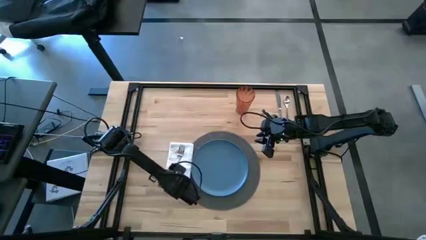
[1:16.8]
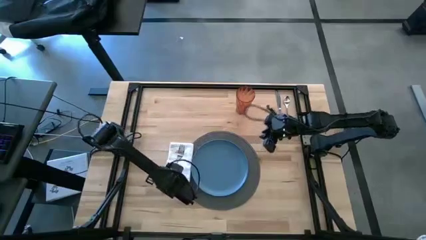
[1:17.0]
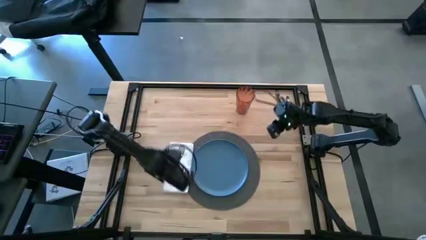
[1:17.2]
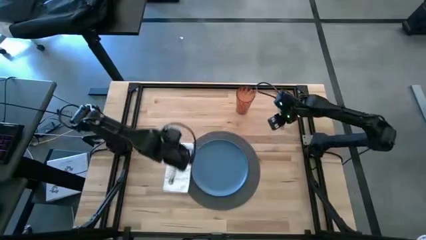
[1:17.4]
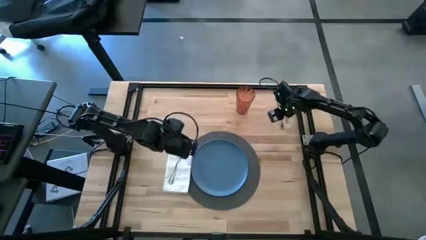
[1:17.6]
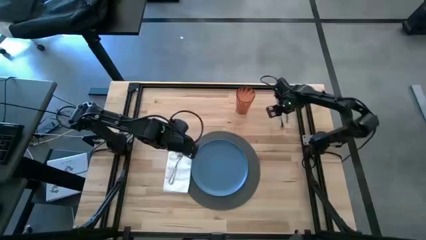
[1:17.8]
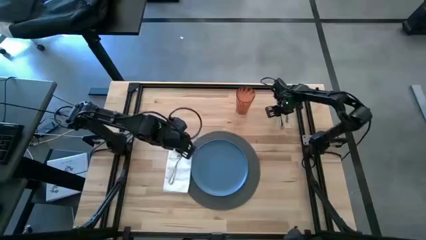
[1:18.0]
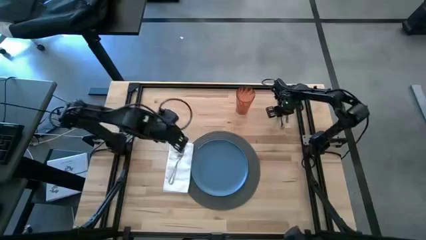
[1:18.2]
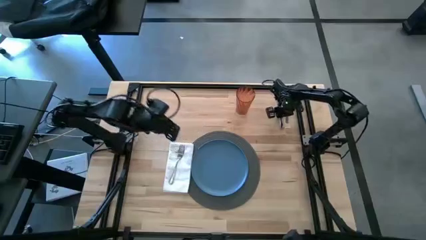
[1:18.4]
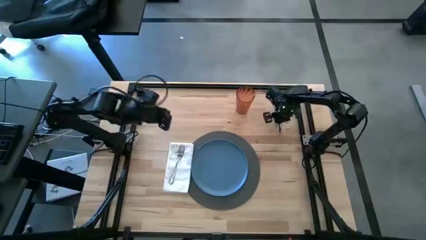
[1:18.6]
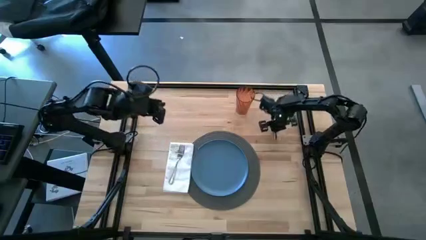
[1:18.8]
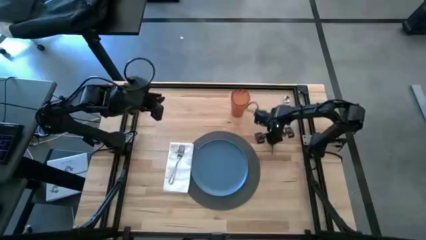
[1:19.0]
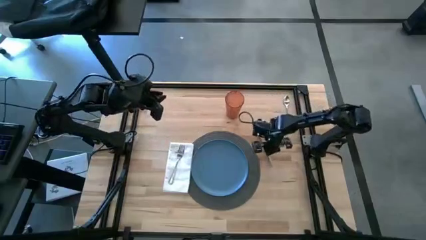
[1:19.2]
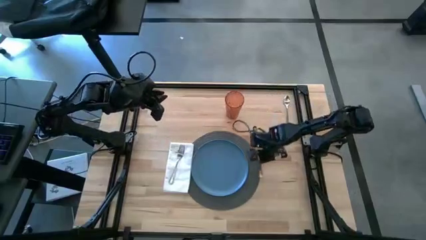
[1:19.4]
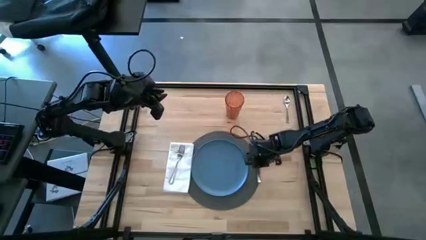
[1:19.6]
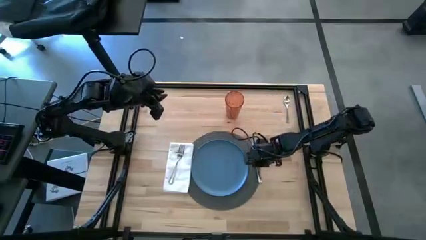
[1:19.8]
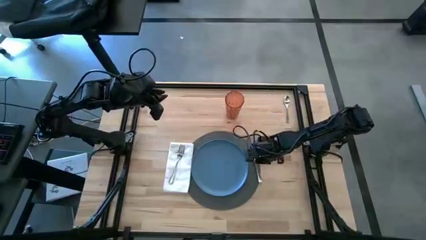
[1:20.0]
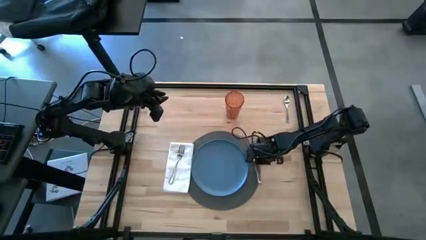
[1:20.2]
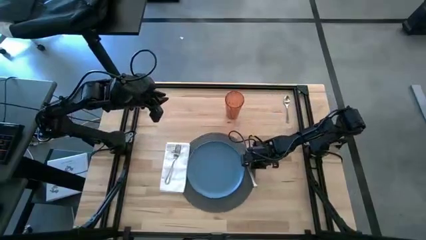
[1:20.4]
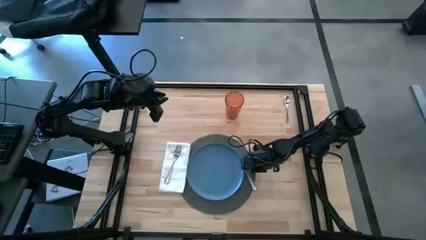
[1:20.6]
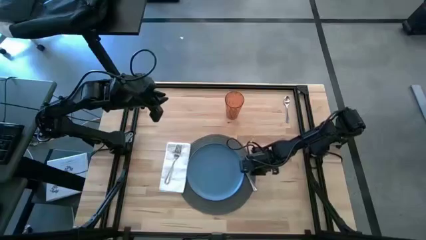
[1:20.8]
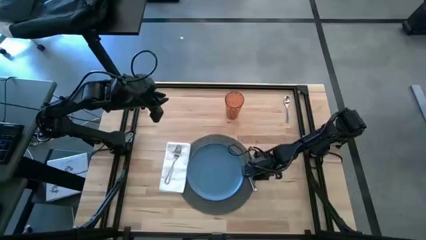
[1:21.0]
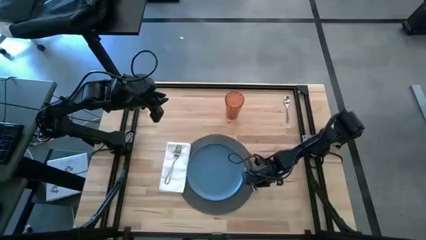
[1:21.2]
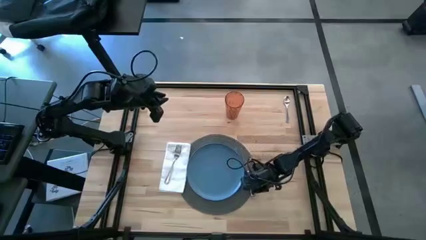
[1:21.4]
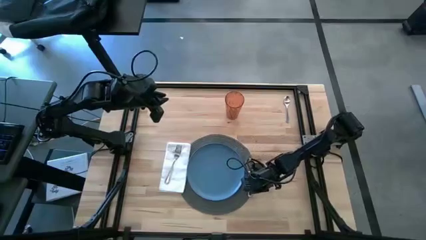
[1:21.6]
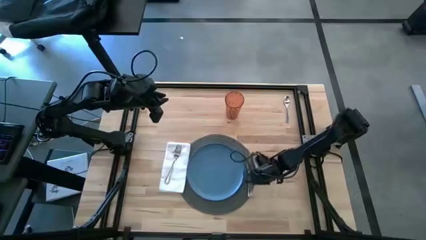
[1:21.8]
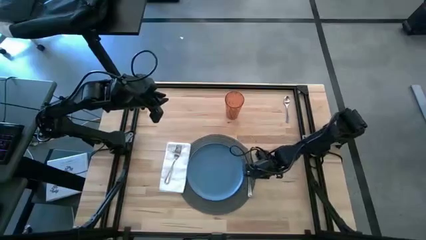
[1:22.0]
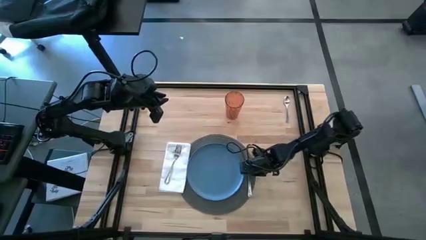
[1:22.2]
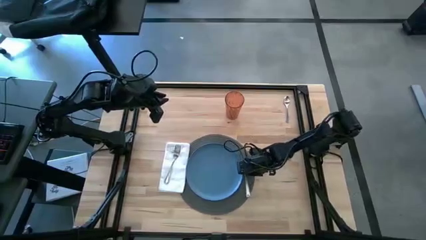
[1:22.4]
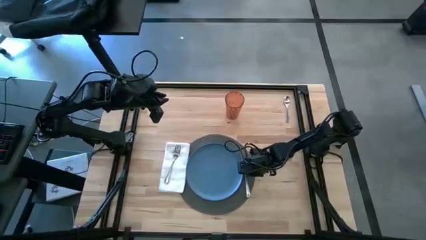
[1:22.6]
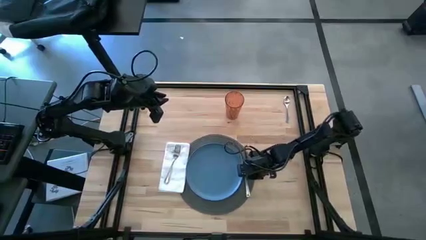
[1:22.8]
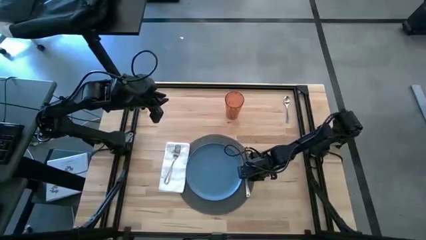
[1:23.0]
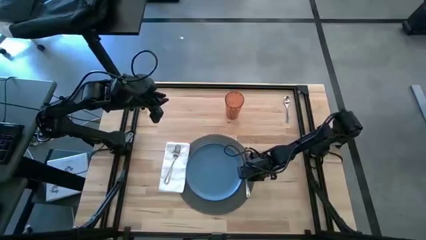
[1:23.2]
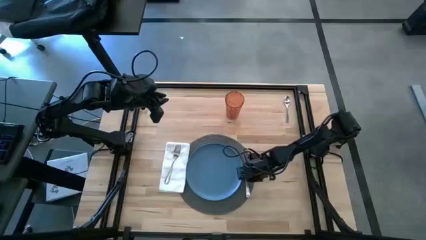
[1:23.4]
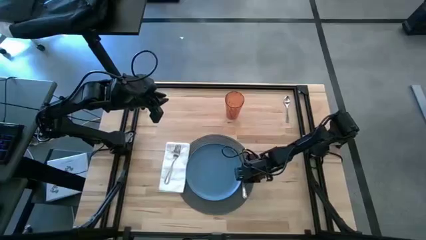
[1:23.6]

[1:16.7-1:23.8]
Task: Set table place
Put the silver knife on the gray mat

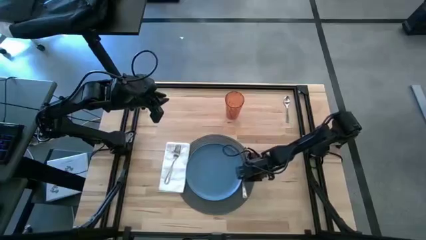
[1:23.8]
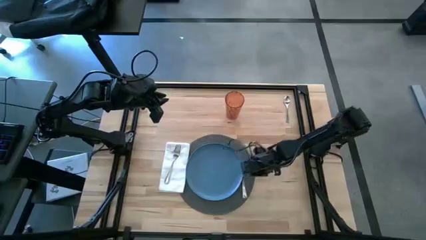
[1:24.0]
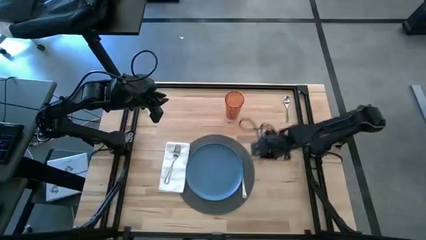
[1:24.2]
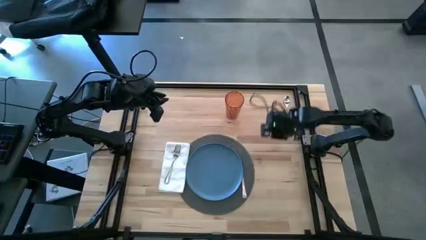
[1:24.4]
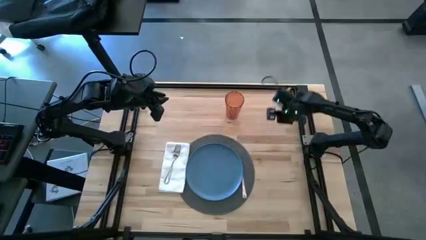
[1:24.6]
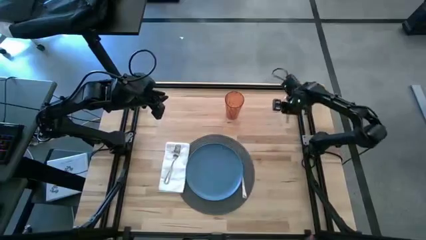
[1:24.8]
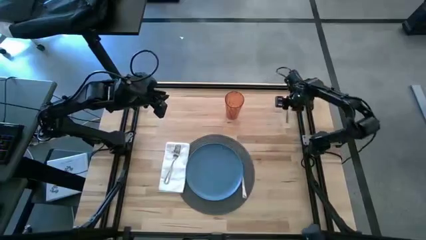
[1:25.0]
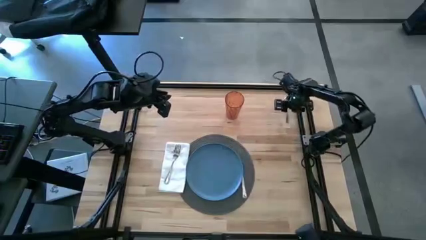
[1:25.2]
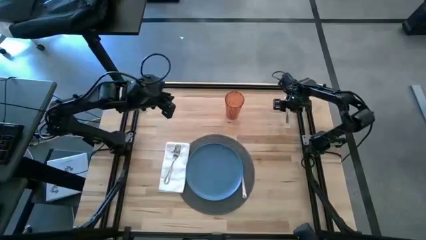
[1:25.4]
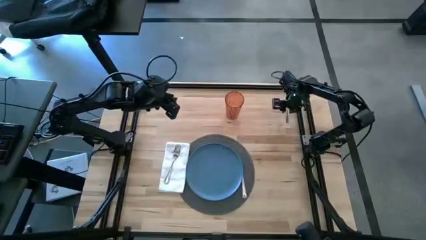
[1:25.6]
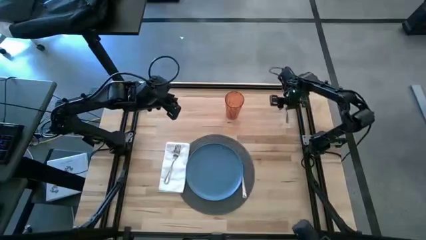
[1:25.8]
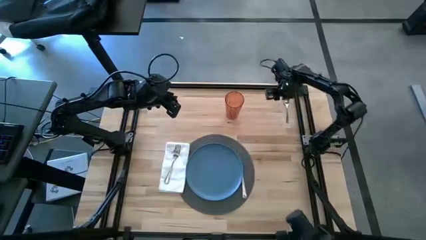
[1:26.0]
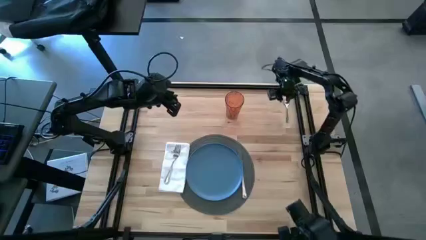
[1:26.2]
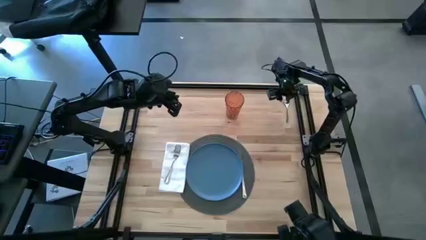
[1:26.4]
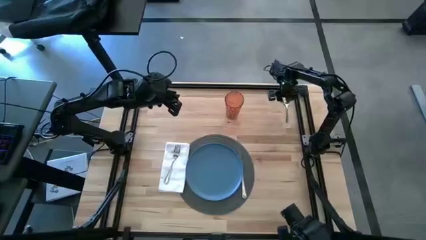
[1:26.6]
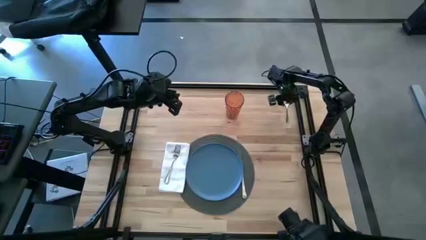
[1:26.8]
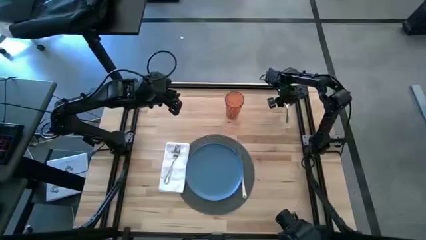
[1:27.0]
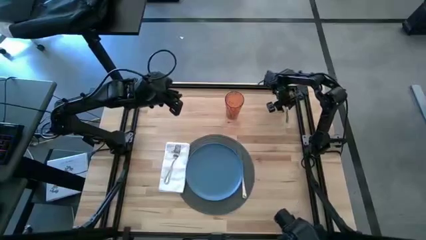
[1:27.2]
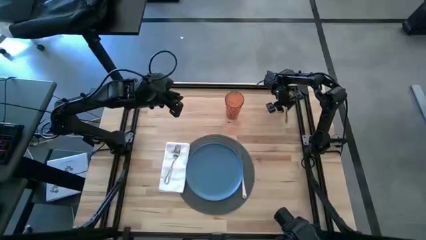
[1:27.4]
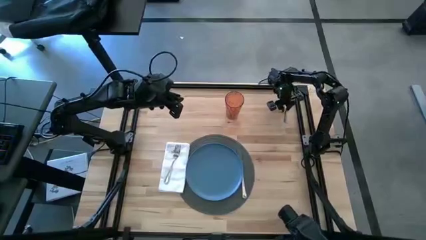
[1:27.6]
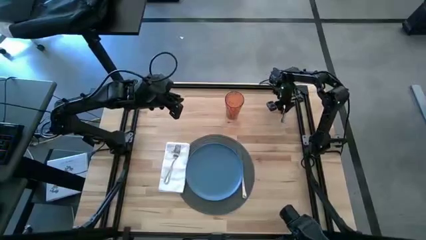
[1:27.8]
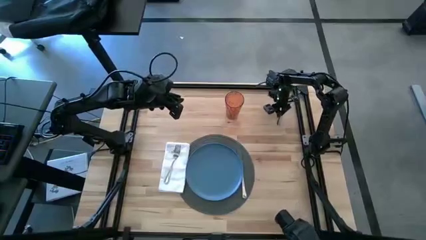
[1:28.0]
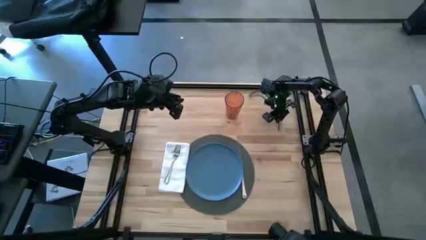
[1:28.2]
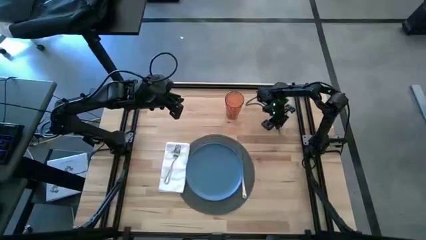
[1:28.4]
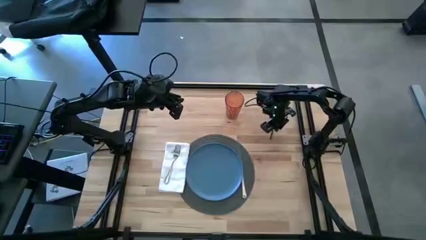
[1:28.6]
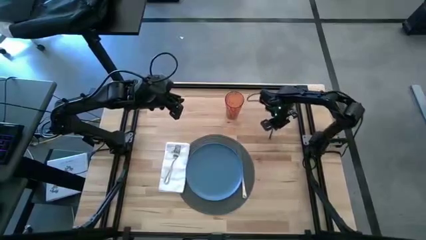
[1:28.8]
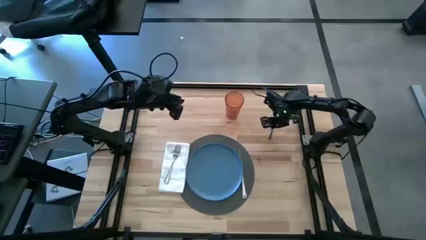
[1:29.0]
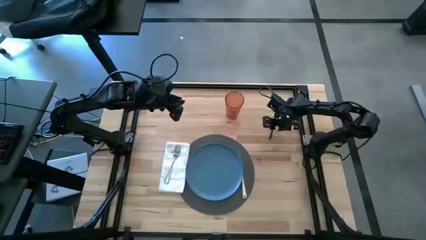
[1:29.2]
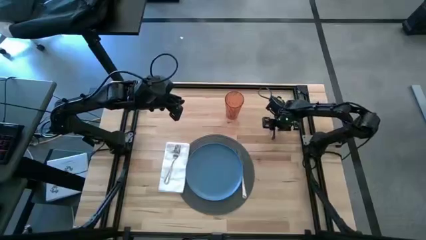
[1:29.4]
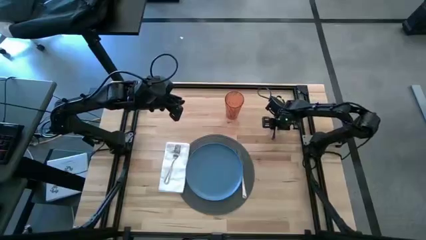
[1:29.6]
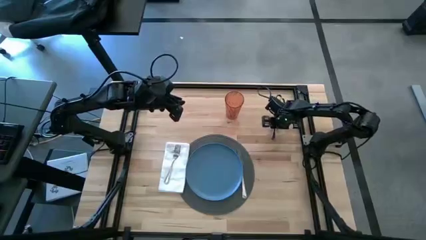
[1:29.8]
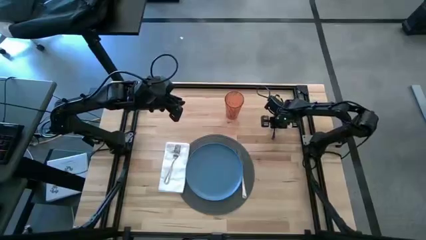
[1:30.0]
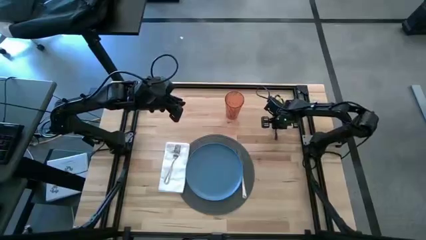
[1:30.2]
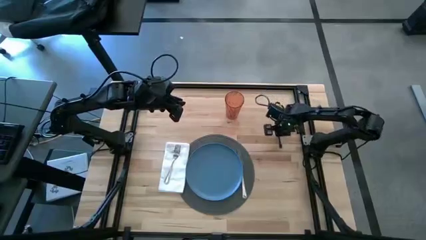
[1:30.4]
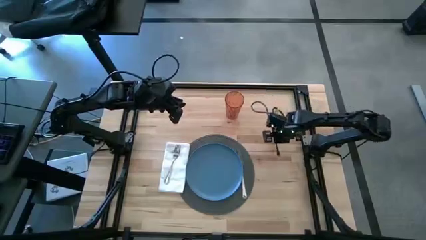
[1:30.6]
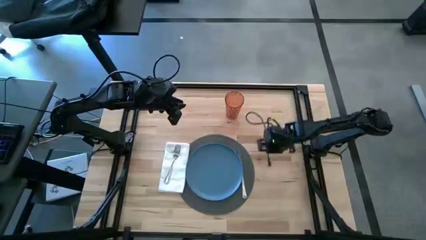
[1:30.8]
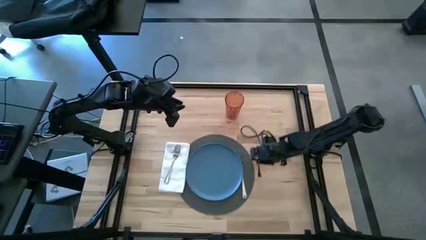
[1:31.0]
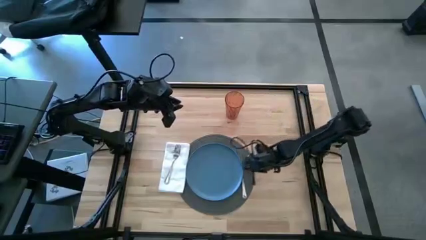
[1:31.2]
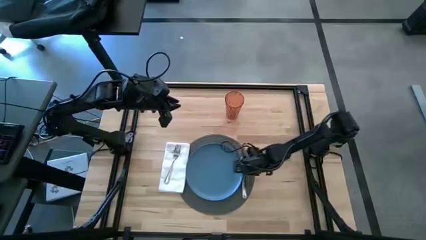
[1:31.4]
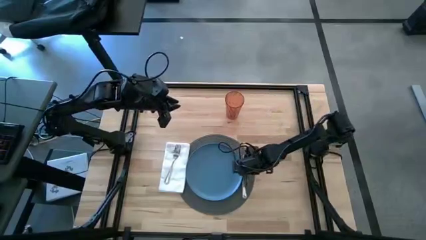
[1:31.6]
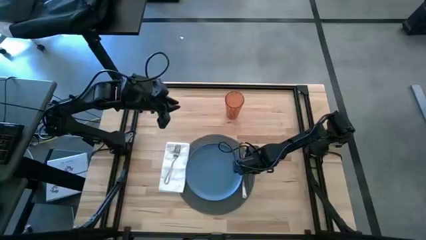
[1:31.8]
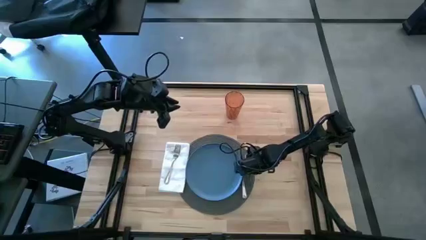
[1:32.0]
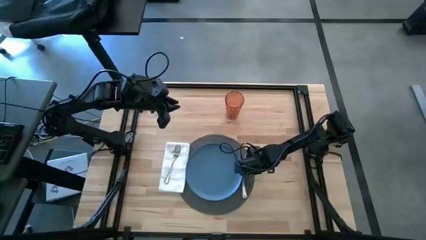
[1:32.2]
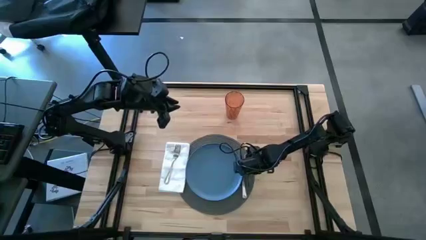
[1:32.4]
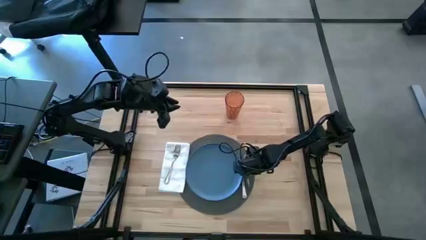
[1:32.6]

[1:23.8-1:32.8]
Put the silver spoon on the gray mat

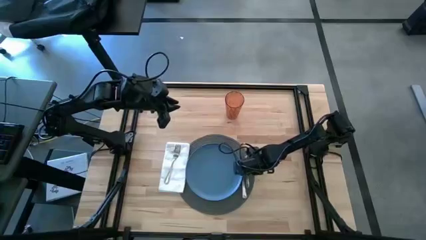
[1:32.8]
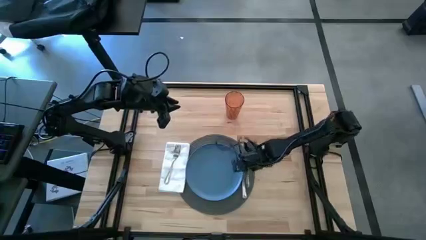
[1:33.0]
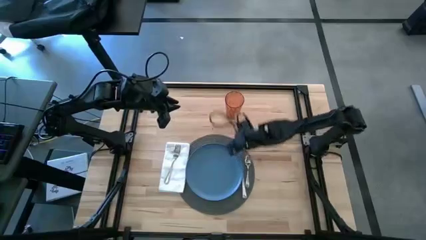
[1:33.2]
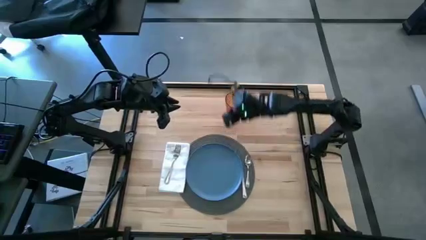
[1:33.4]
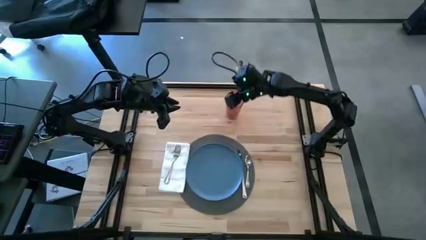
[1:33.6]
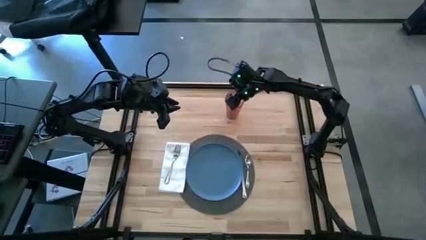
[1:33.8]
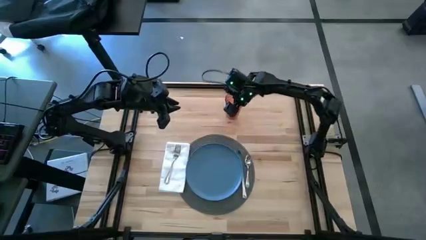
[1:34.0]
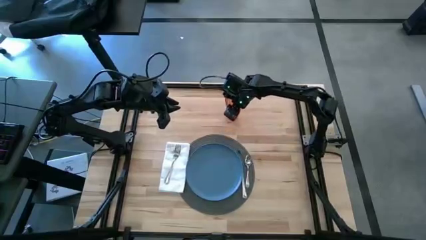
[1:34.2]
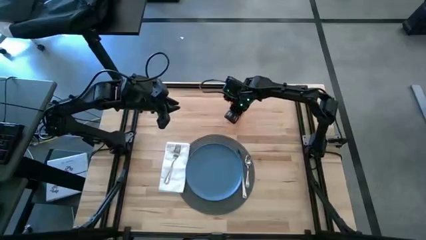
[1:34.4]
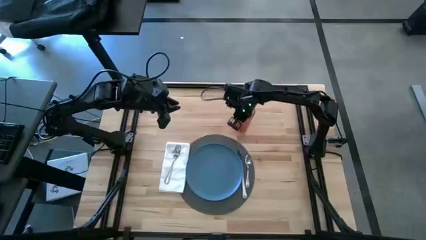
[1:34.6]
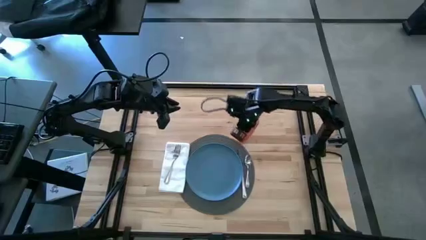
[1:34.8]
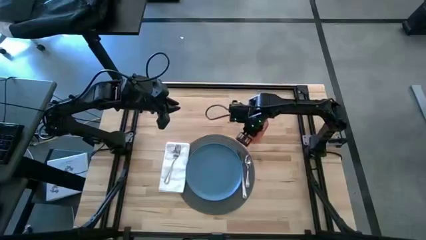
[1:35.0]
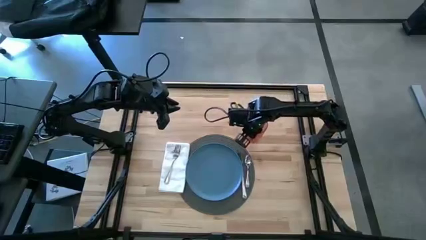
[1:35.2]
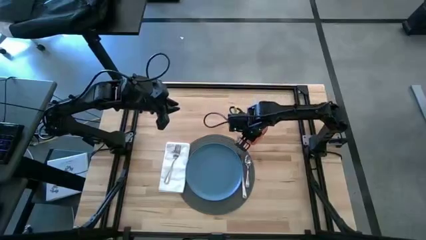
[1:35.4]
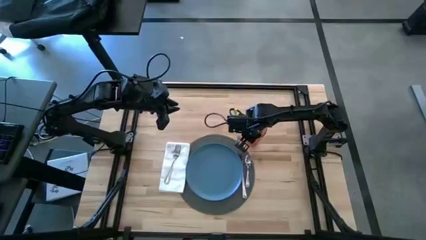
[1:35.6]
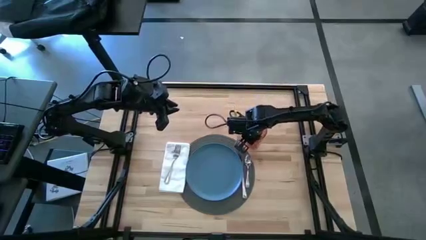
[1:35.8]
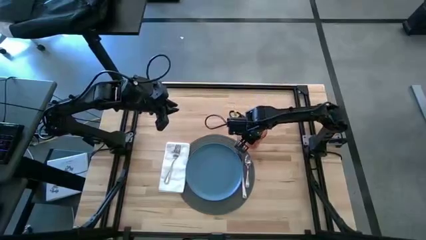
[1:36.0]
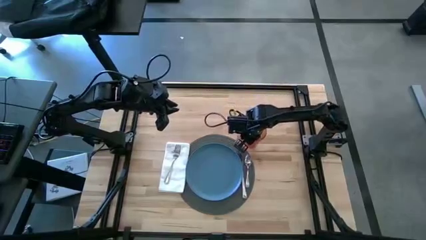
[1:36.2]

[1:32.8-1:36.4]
Move the orange cup to the top right of the table
